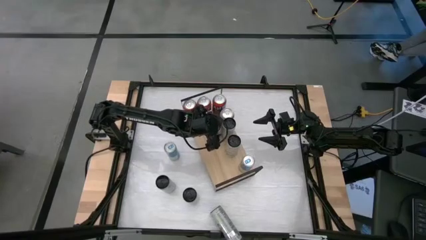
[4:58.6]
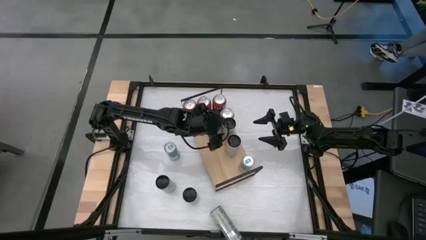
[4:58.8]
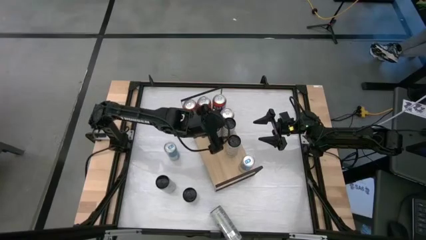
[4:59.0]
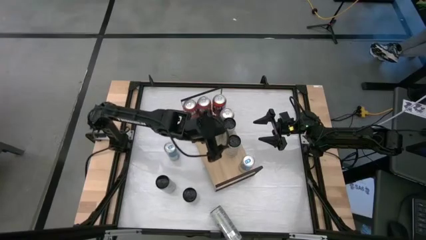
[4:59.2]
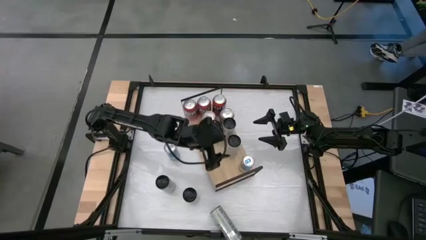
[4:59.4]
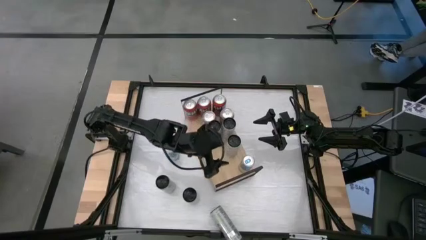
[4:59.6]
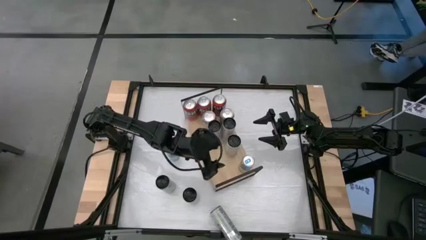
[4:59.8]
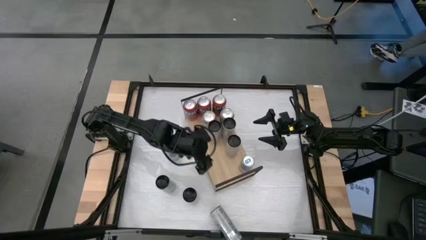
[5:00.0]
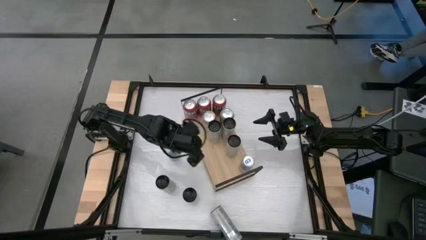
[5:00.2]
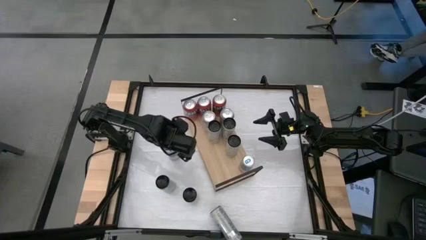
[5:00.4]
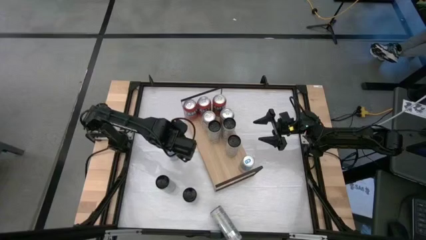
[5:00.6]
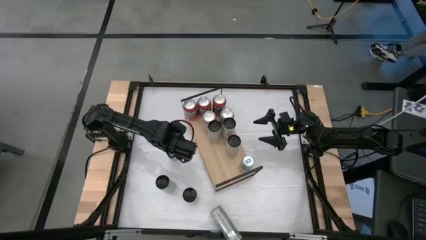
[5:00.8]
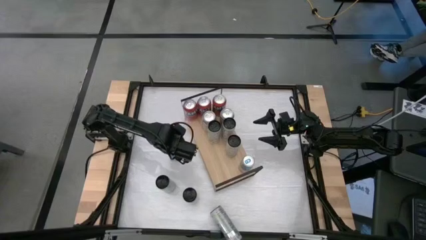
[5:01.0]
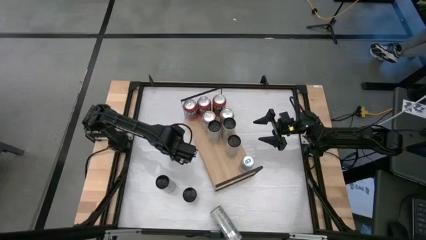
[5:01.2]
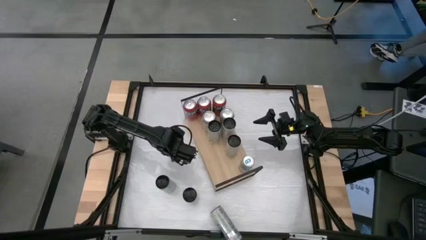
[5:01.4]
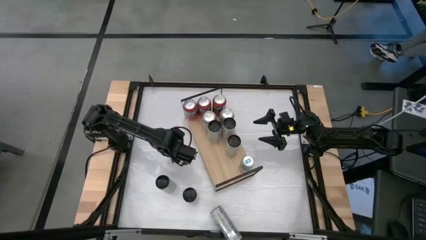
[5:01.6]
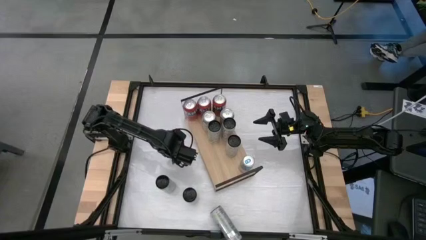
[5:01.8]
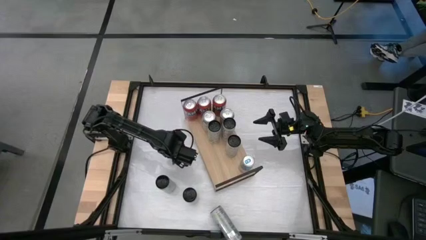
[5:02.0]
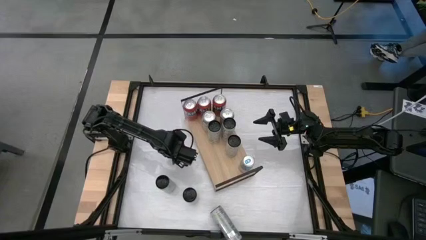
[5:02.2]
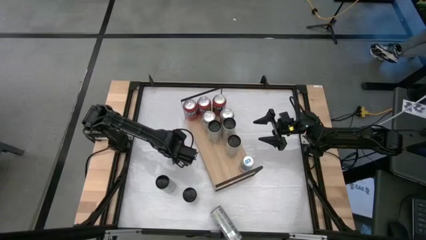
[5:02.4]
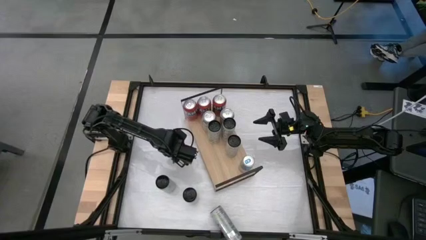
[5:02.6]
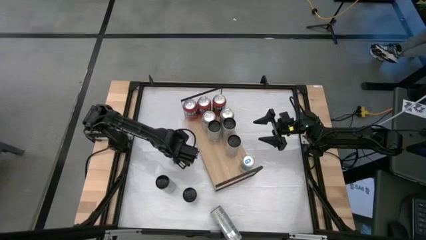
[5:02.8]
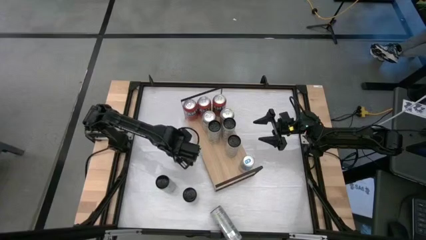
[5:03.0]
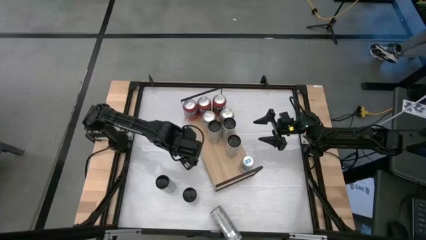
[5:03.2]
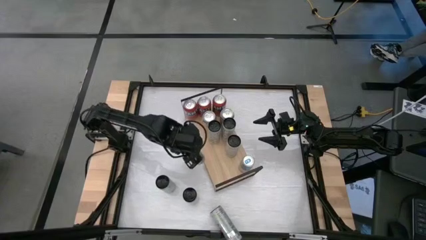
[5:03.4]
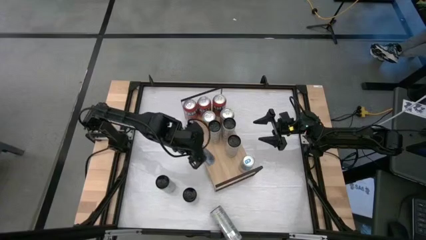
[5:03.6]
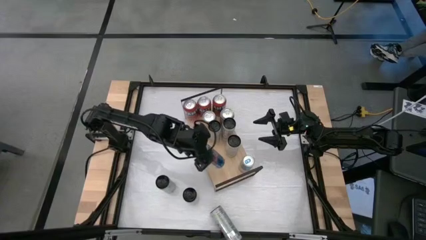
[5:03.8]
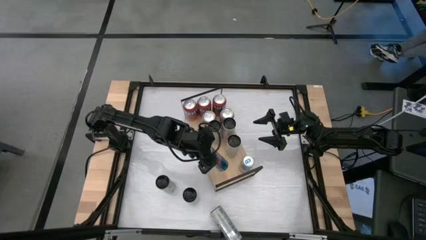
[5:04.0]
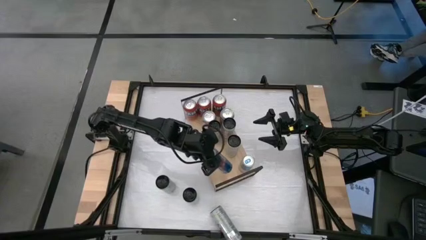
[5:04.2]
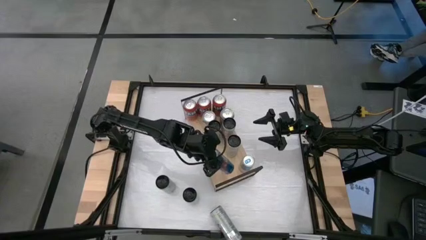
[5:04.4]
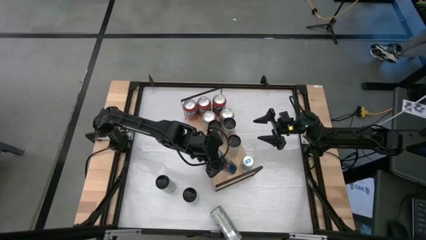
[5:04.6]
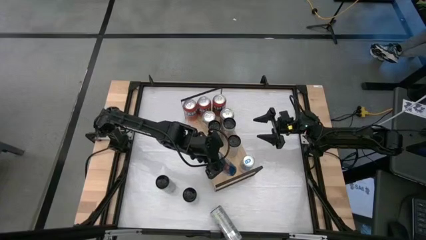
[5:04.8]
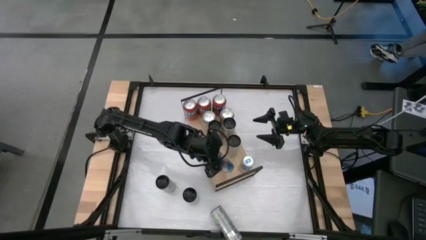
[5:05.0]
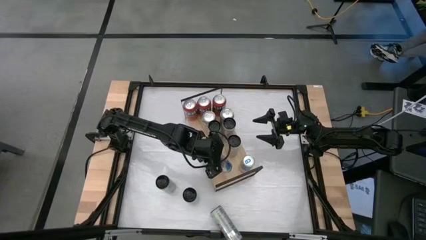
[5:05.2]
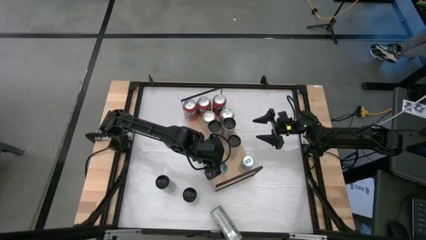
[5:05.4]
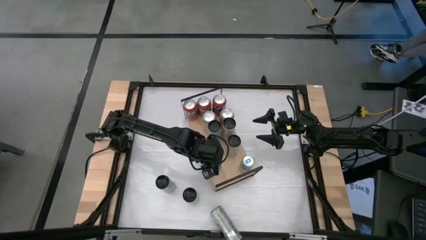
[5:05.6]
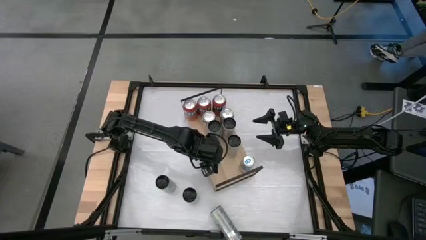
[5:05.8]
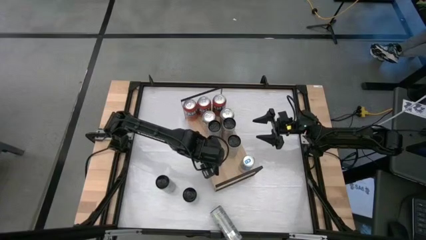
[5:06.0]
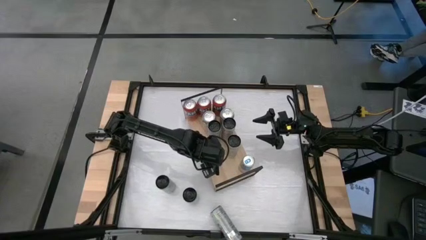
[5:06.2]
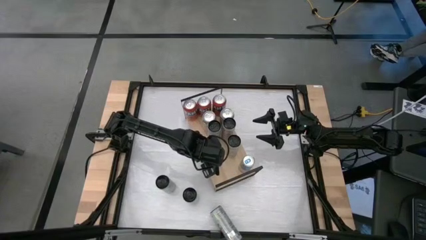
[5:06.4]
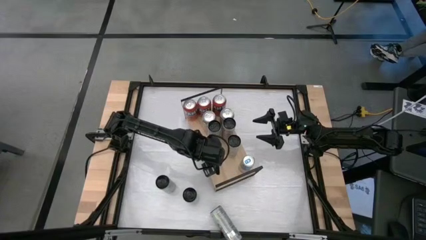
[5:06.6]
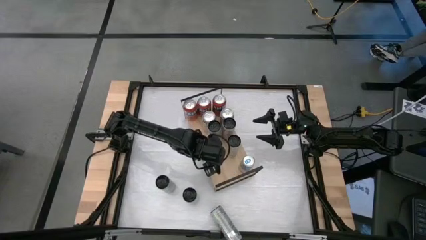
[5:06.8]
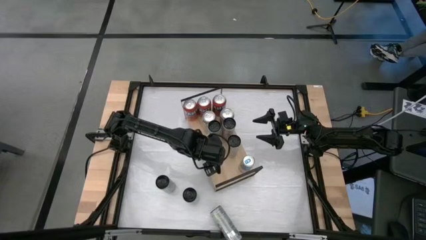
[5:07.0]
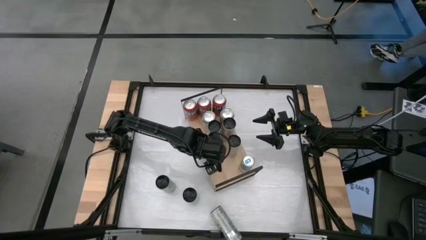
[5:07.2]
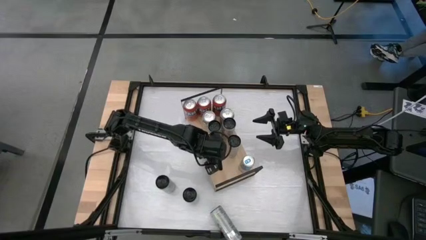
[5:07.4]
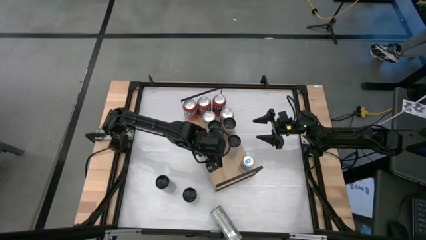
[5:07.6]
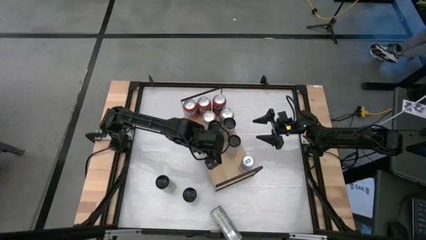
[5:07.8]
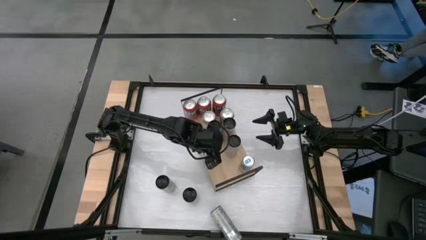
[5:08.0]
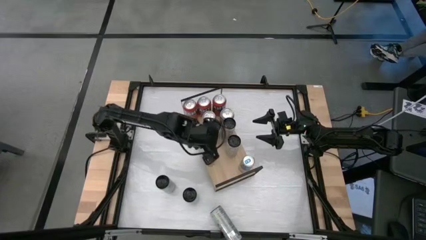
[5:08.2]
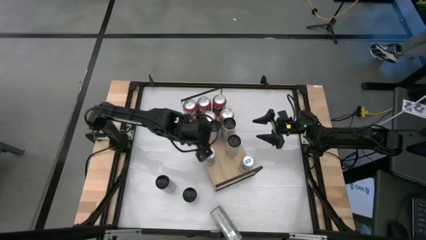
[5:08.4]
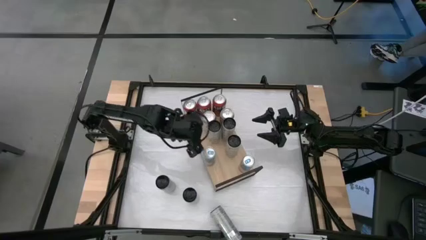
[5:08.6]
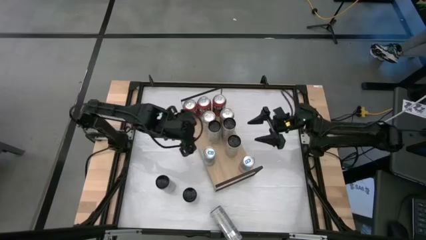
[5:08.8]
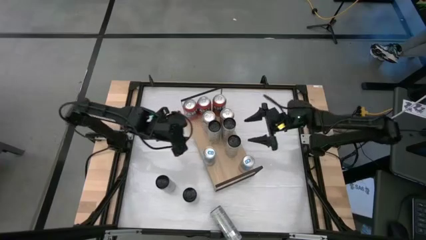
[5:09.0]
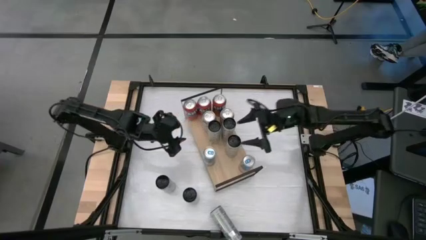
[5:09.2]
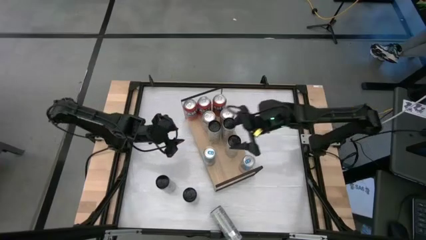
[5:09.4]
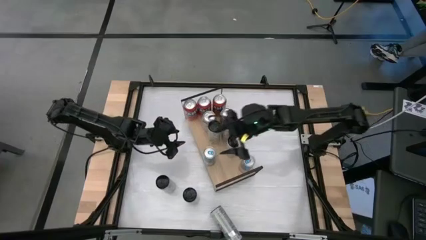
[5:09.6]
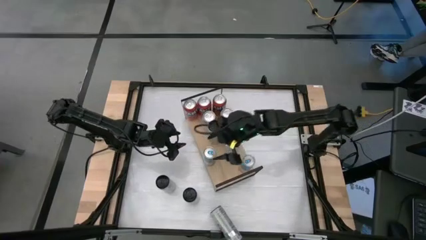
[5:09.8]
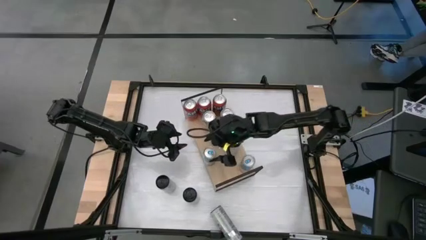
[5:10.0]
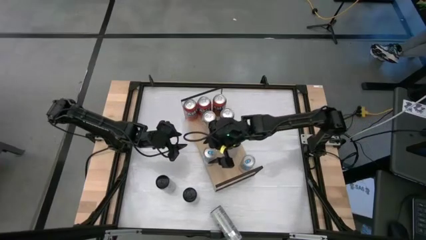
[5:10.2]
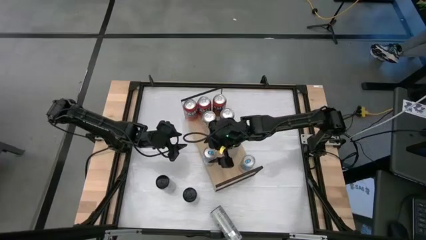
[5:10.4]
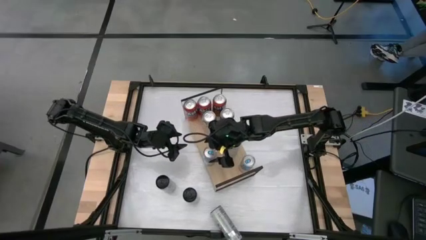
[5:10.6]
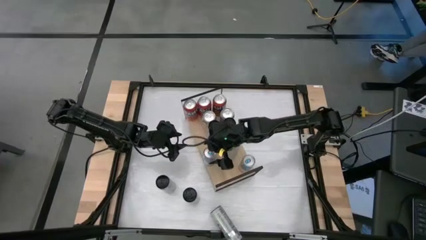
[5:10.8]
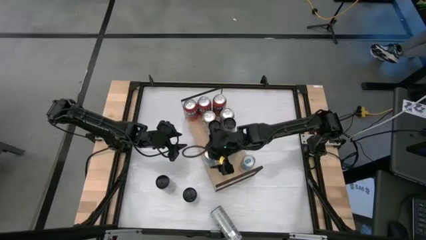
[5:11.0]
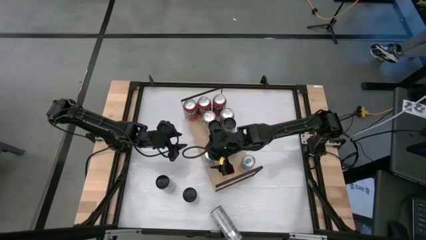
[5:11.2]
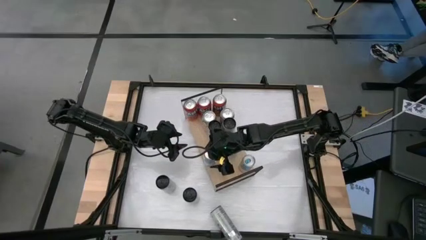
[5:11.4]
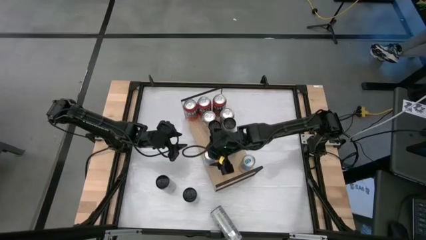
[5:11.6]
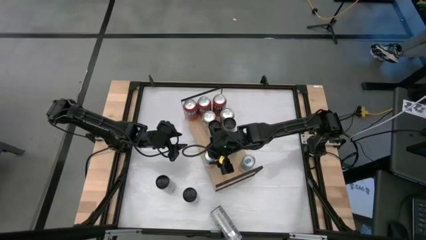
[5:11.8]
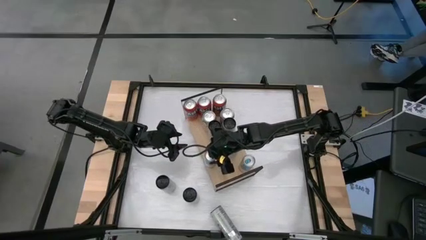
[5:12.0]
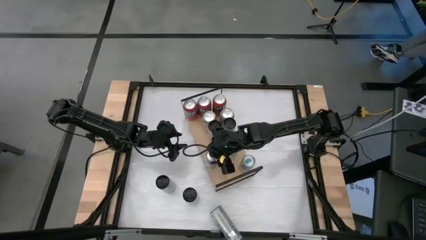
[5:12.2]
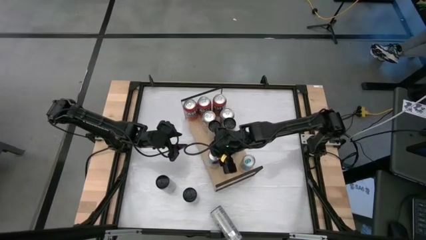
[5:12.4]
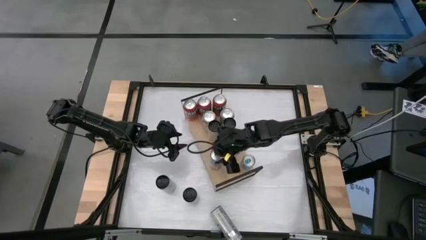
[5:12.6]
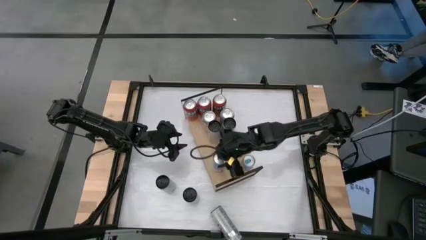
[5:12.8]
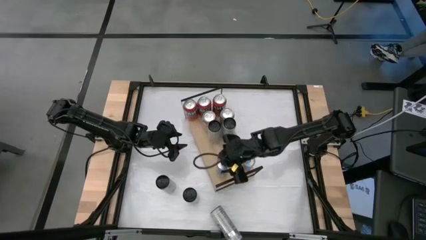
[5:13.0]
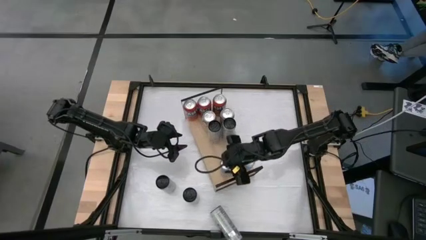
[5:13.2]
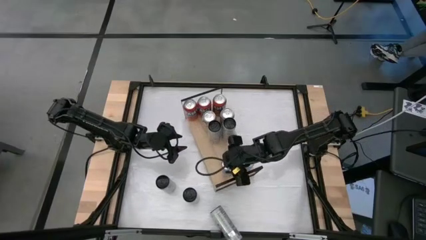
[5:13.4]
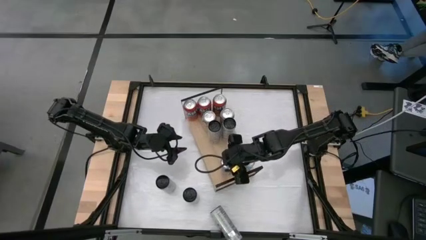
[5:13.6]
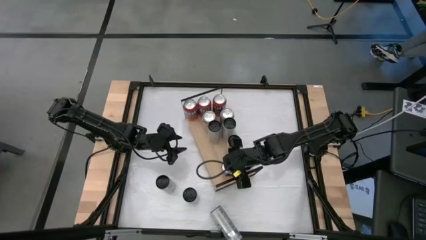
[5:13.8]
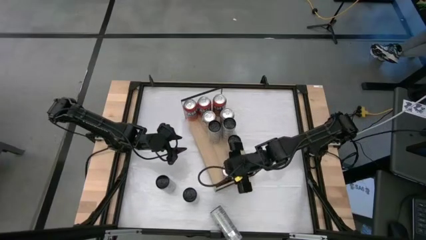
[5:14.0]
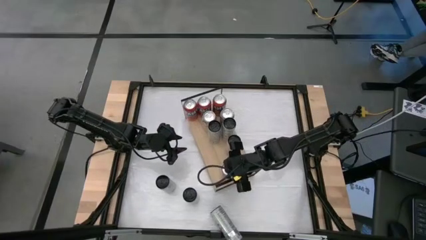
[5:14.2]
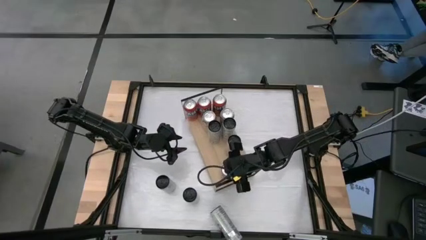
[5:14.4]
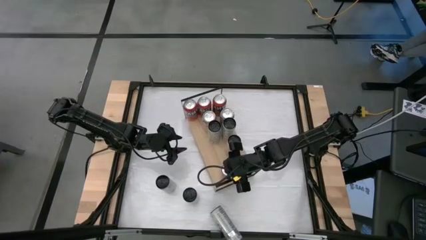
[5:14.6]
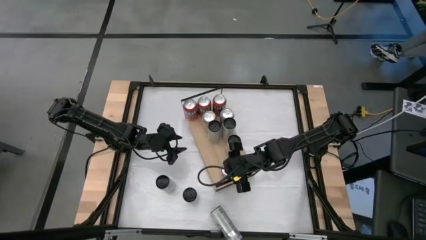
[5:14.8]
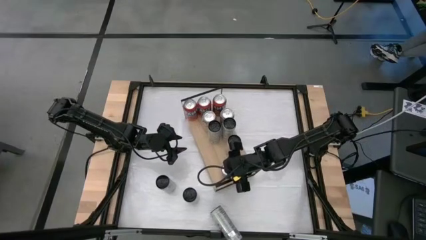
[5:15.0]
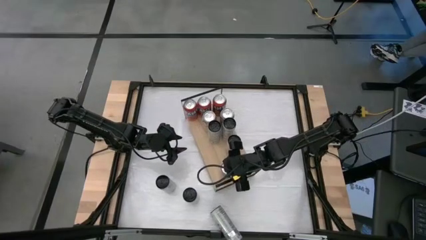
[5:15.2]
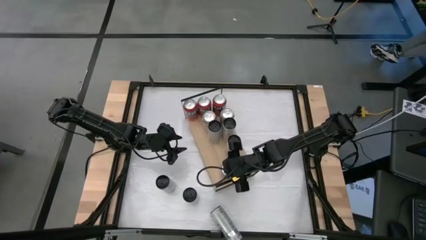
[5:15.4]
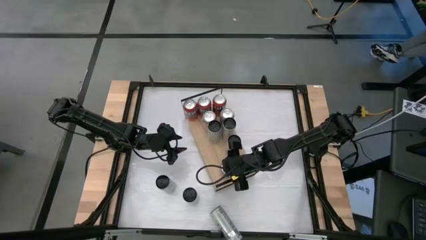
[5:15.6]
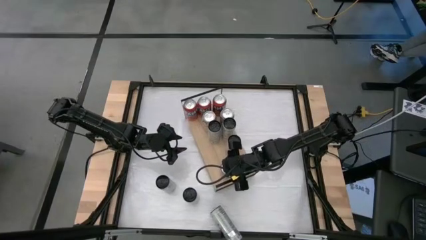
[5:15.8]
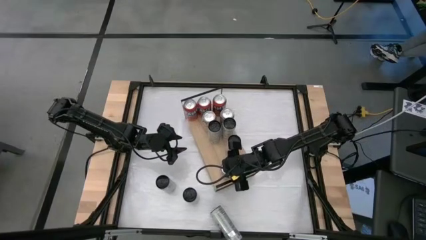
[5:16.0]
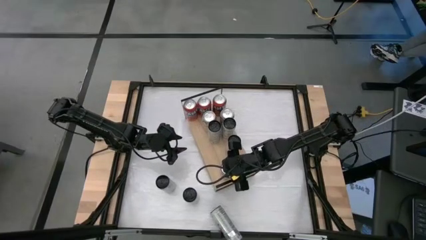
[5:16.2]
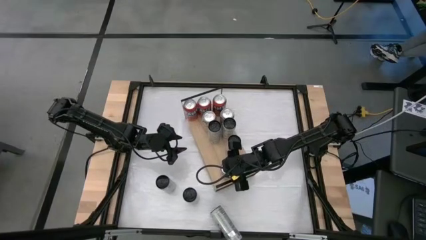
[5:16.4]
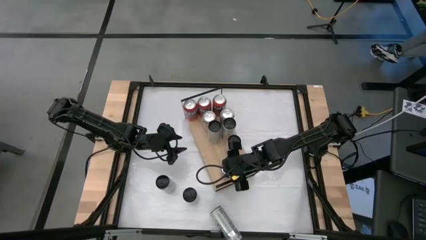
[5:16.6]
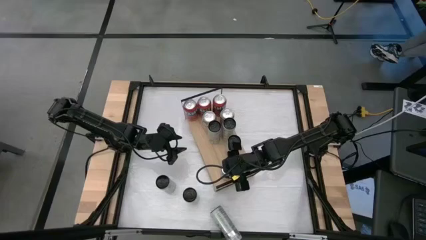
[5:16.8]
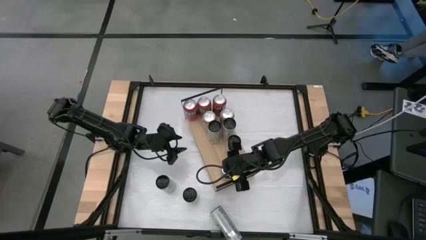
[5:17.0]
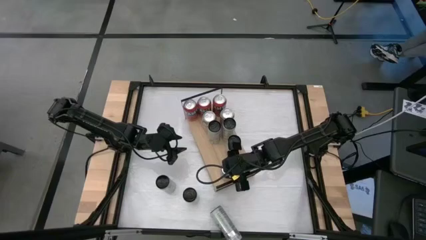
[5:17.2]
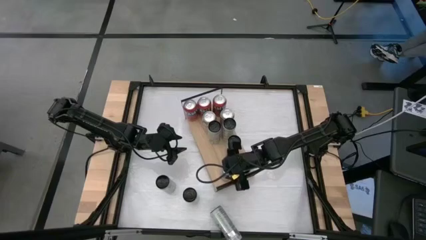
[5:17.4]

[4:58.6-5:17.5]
Task: Place canned beverage on shelf
Align the blue soda can with the other blue soda can
